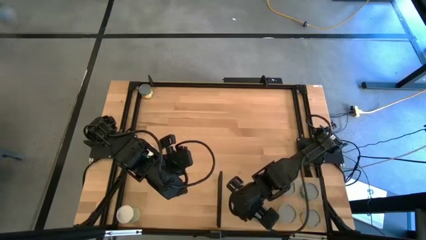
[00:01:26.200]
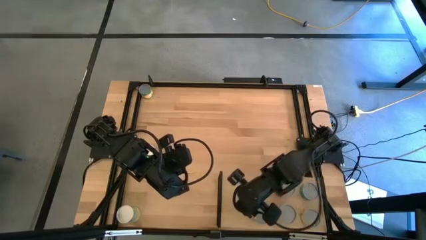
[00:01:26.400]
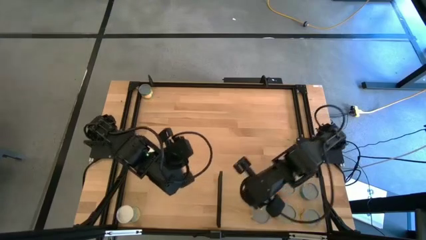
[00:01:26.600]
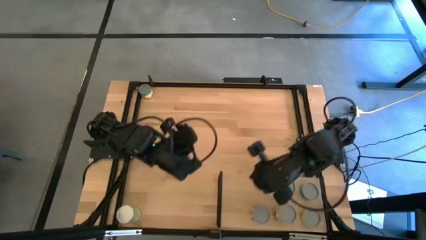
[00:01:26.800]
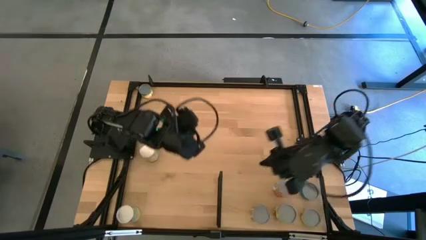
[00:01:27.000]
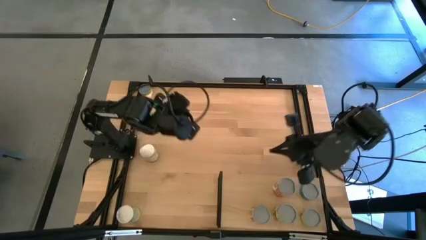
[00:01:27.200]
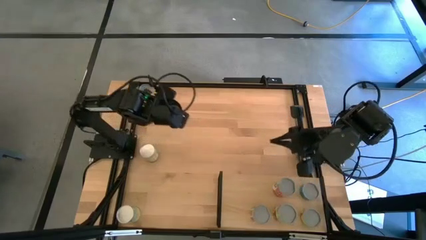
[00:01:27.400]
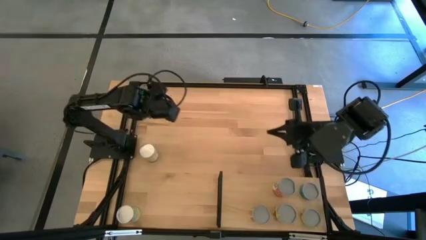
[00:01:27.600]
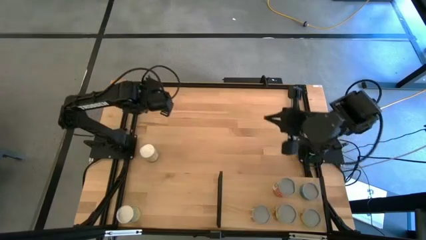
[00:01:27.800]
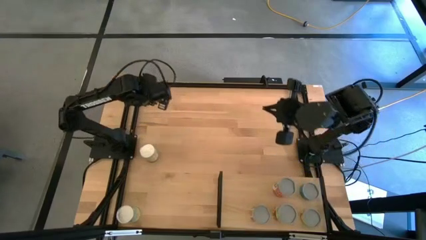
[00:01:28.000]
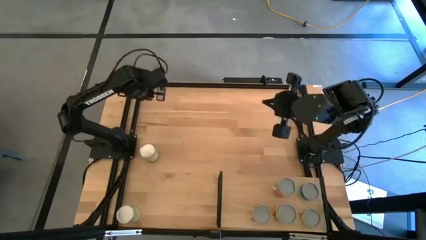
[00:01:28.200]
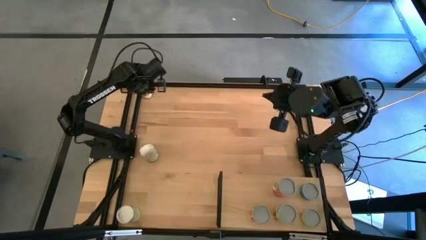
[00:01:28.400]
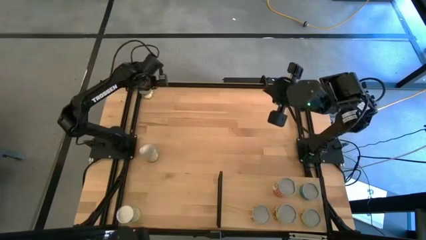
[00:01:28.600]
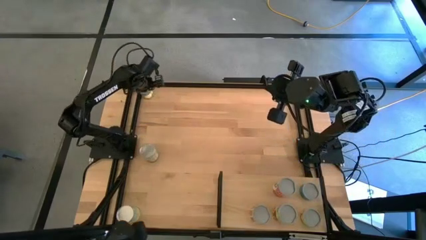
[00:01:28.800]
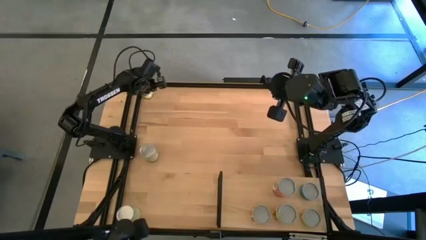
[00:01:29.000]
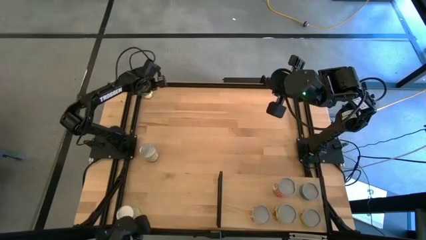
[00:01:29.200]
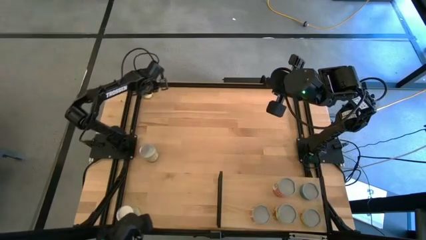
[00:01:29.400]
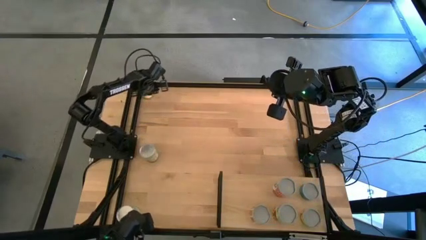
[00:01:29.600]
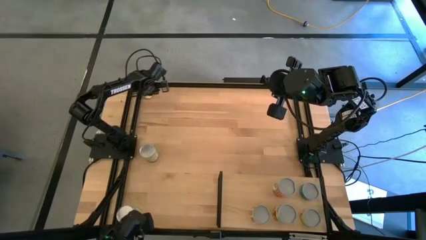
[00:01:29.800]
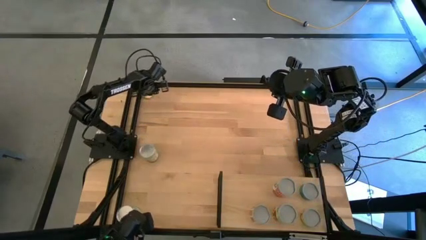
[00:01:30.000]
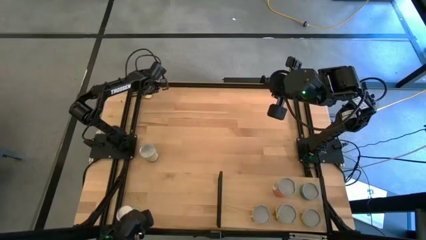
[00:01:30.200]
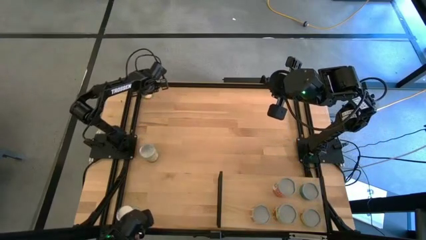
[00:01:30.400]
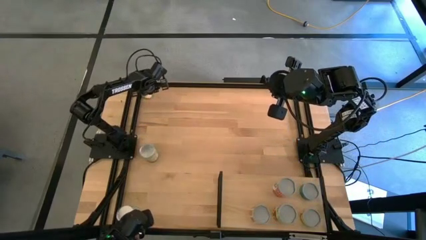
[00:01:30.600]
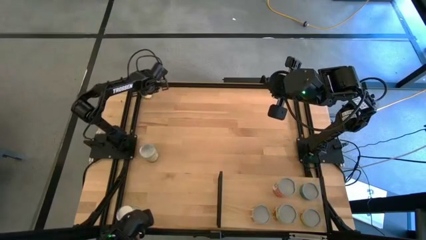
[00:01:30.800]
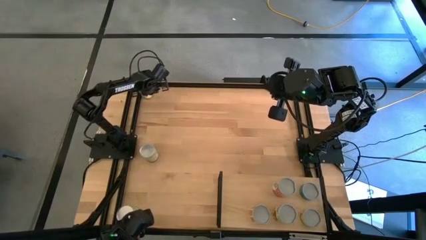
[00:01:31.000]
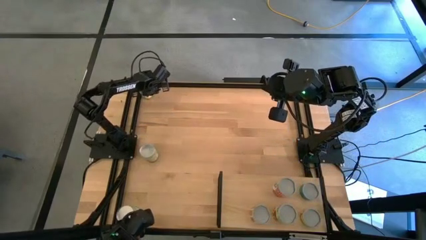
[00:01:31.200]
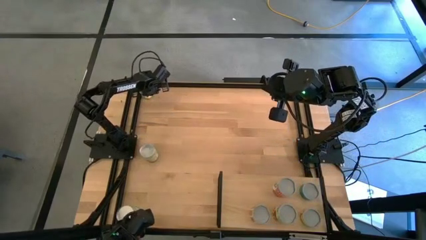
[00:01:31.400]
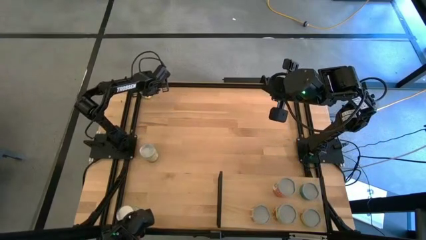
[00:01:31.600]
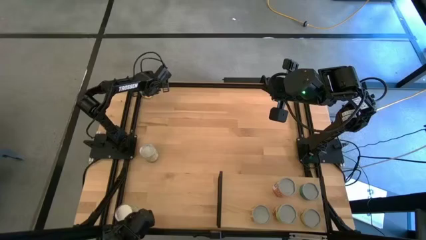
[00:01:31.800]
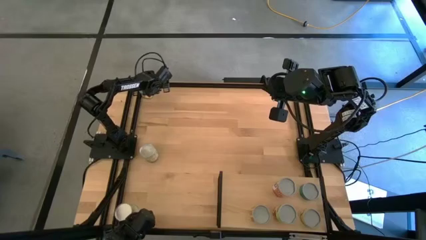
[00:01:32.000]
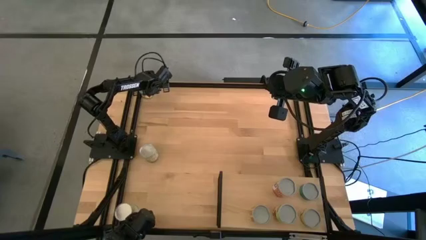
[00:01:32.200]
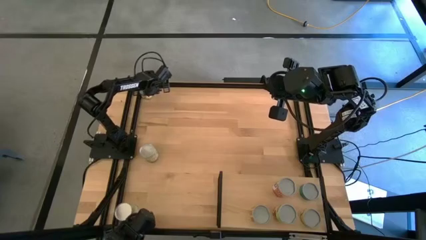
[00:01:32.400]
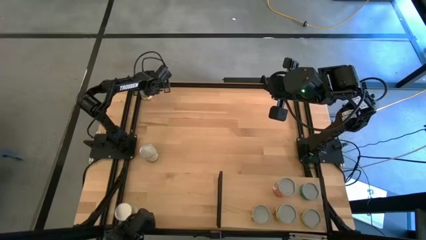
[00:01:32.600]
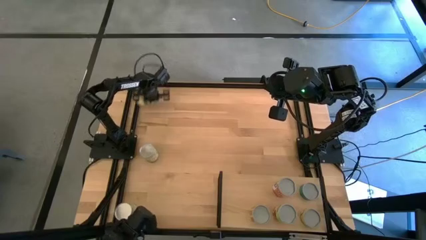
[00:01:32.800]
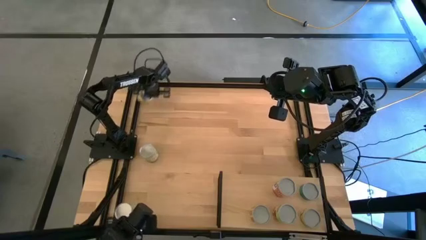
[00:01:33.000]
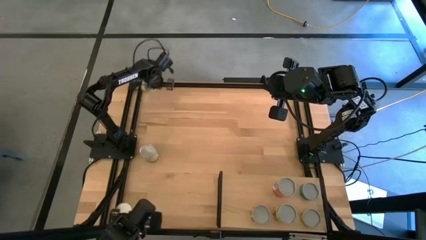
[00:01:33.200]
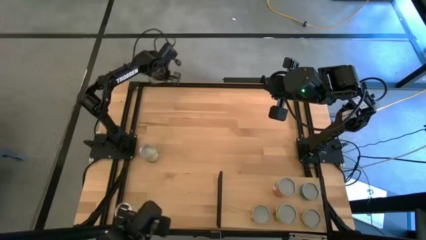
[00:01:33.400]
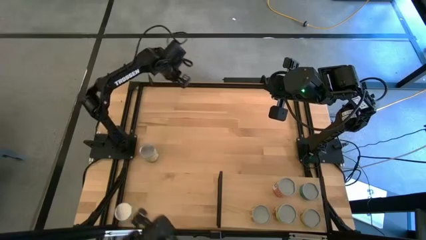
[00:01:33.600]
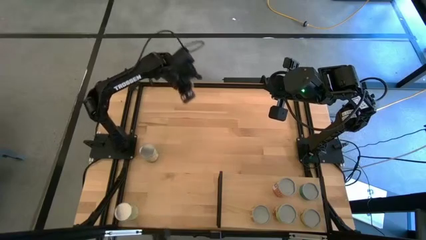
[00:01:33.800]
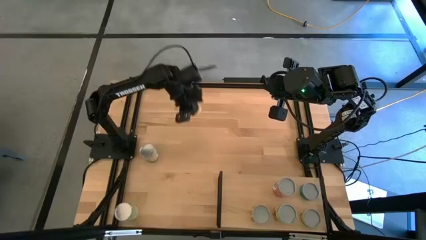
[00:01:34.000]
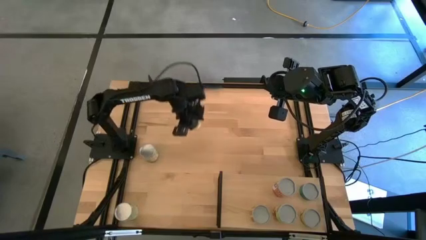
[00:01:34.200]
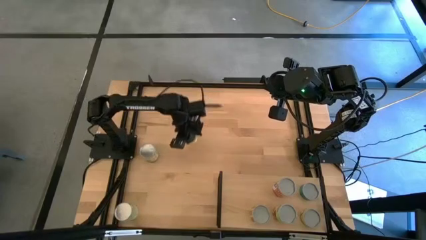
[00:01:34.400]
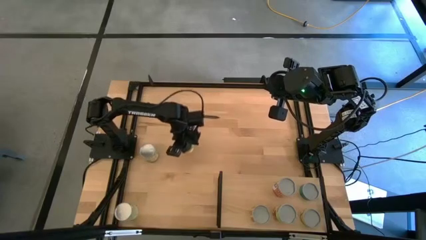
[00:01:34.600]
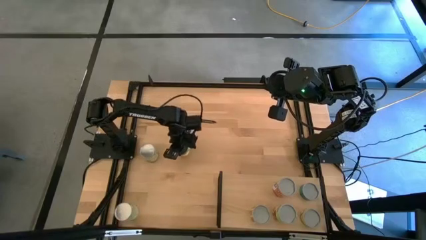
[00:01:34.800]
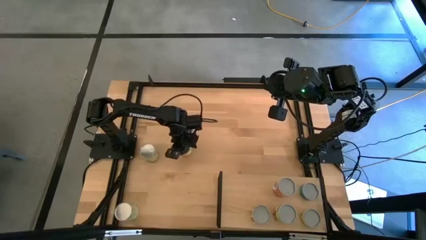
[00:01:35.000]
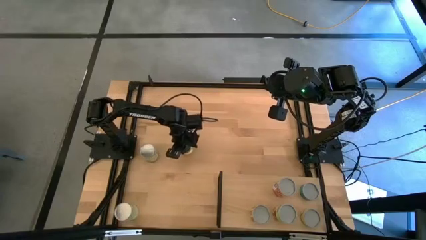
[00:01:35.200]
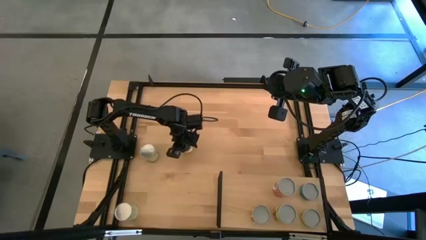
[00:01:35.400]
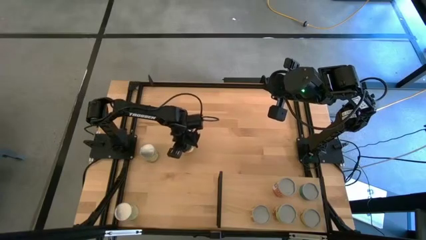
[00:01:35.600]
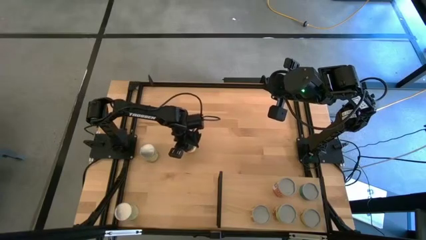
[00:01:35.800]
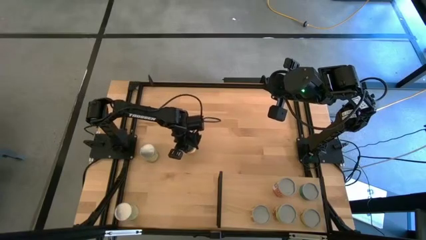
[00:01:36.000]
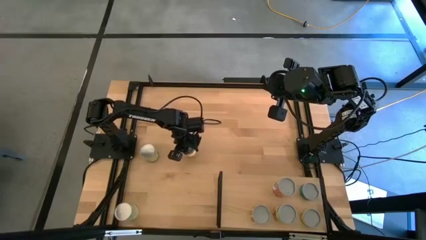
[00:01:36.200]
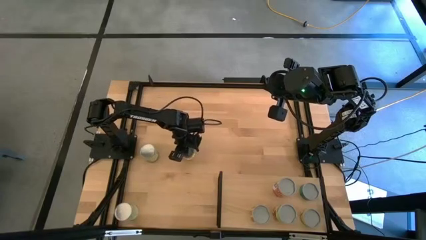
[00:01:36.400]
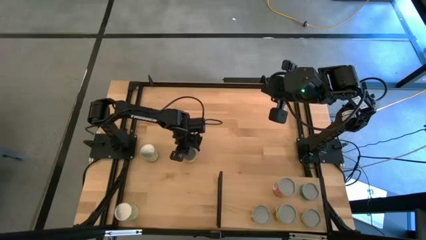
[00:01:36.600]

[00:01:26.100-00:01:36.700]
Task: Pick and place cans onto a shelf
Put the canned peach on the shelf
